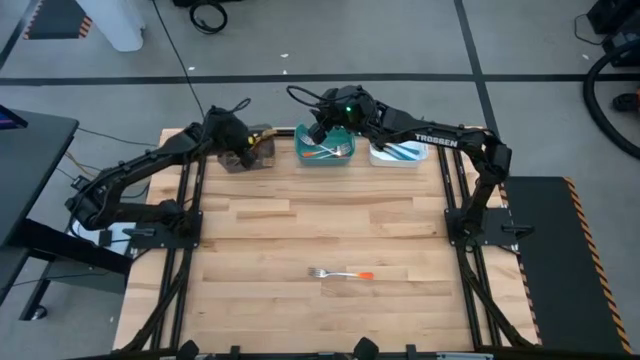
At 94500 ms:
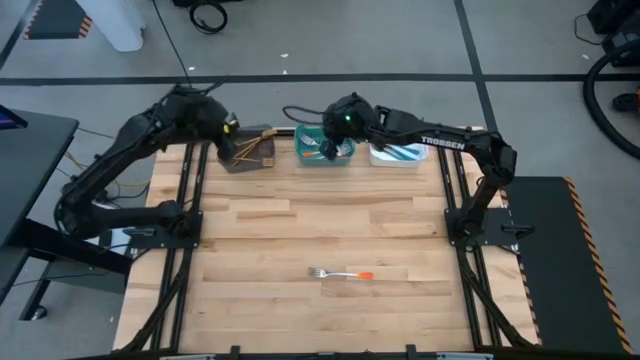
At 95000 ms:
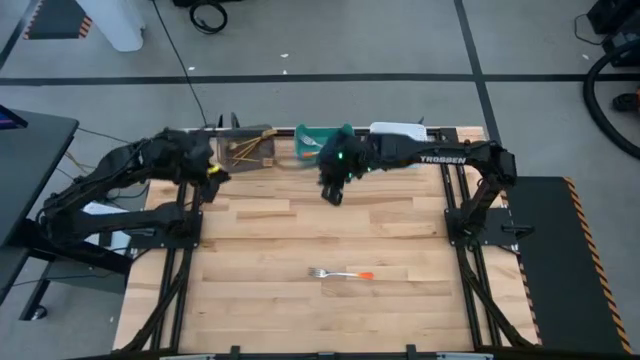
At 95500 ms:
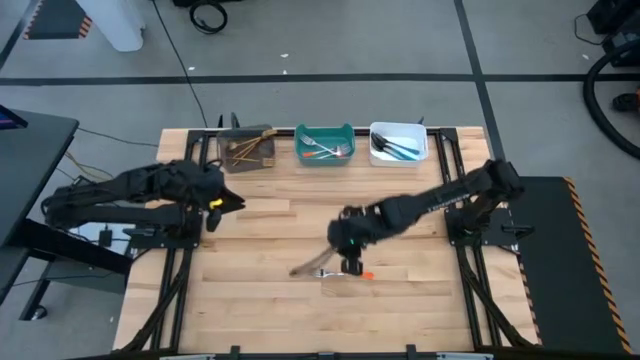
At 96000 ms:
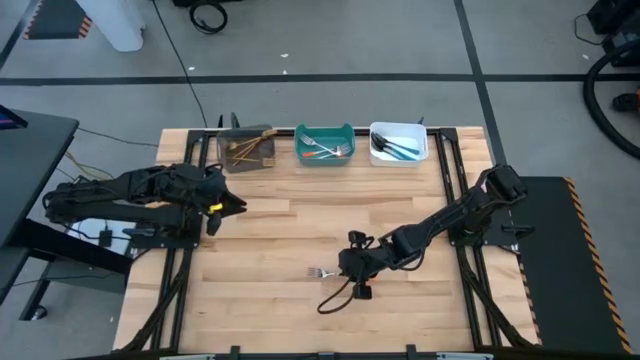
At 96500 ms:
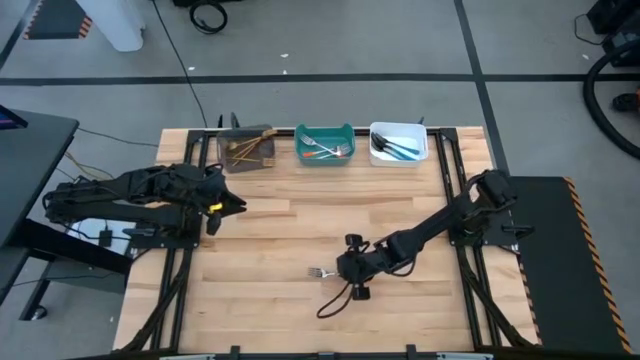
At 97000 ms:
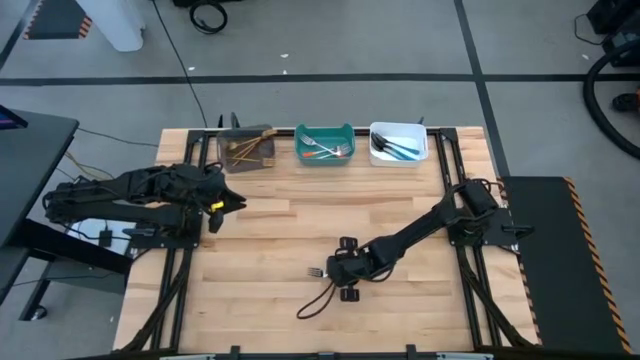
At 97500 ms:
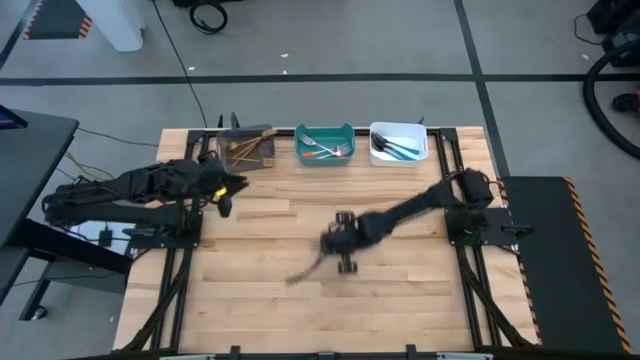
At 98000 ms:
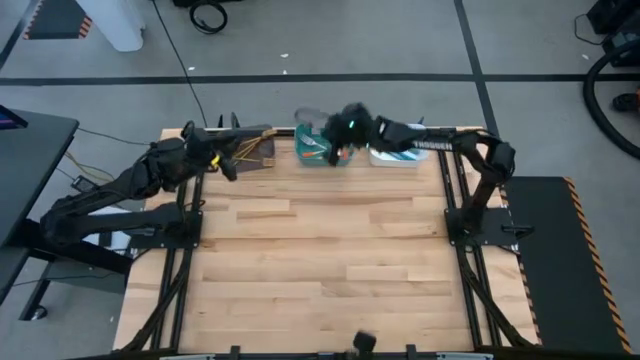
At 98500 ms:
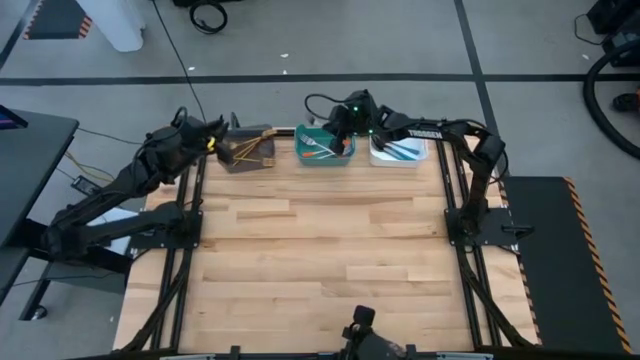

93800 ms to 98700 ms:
Task: Sort silverware by color (type)
Put the orange fork into the blue bin

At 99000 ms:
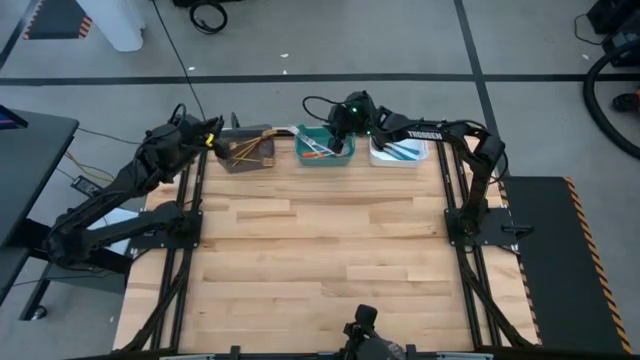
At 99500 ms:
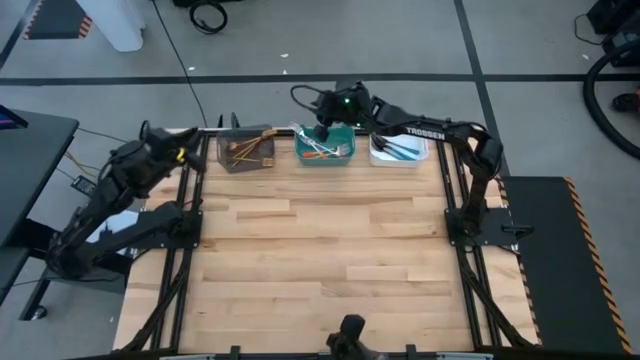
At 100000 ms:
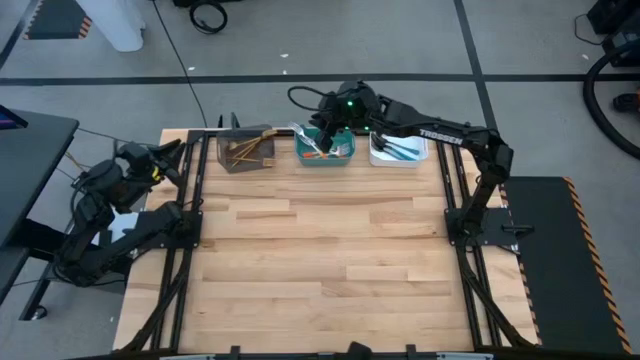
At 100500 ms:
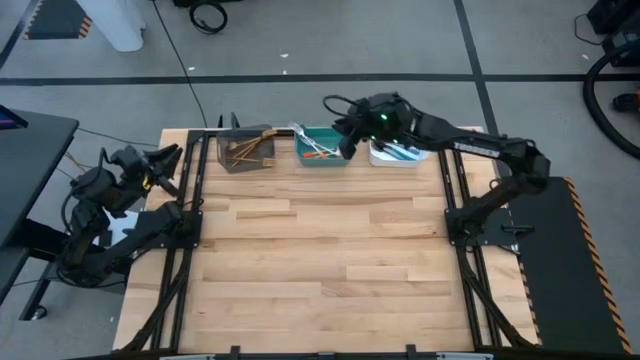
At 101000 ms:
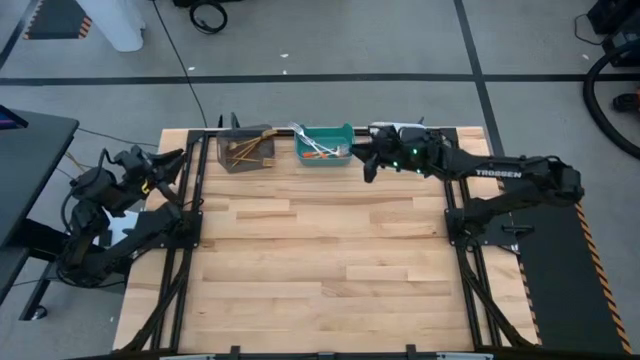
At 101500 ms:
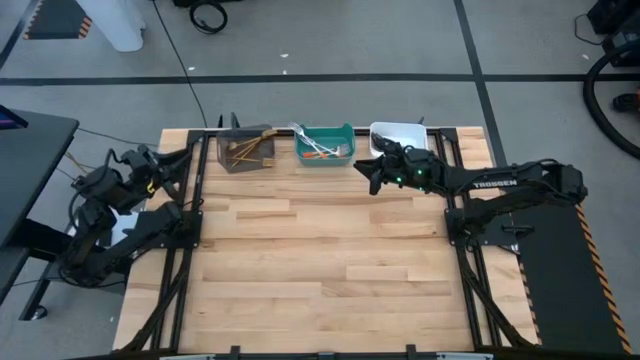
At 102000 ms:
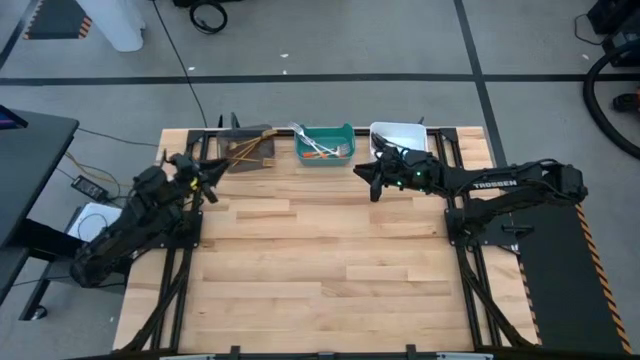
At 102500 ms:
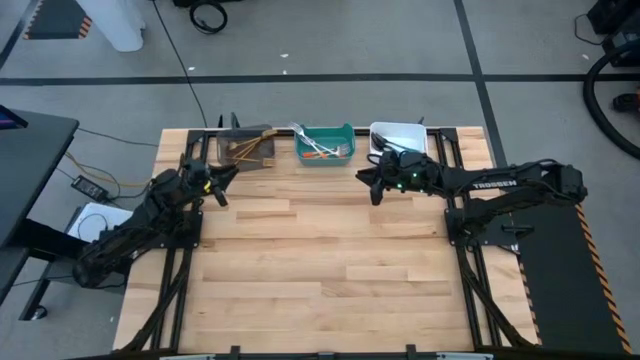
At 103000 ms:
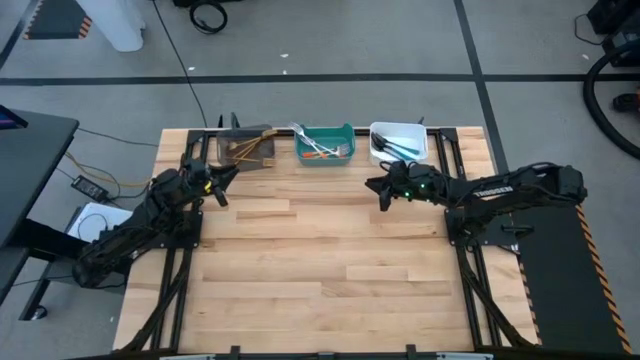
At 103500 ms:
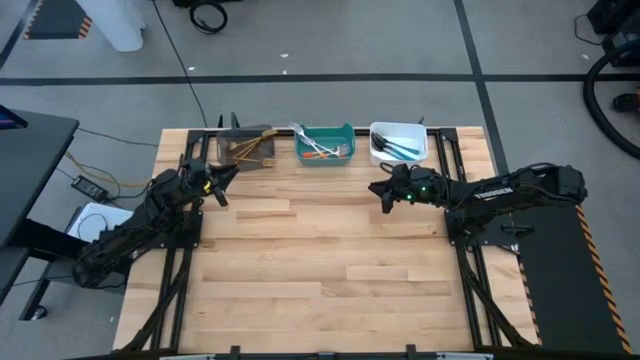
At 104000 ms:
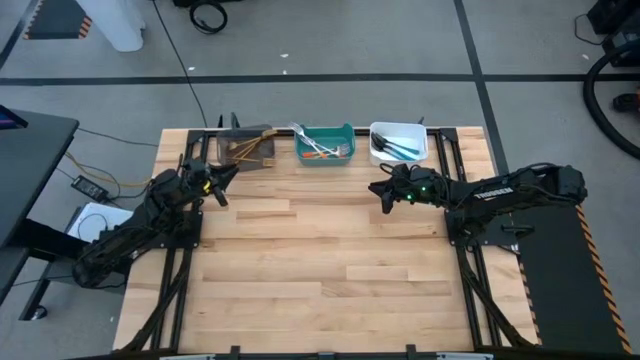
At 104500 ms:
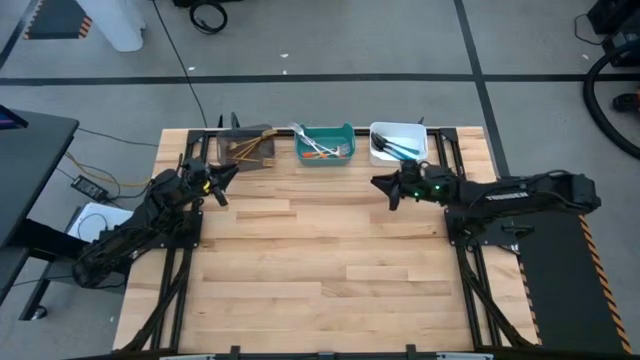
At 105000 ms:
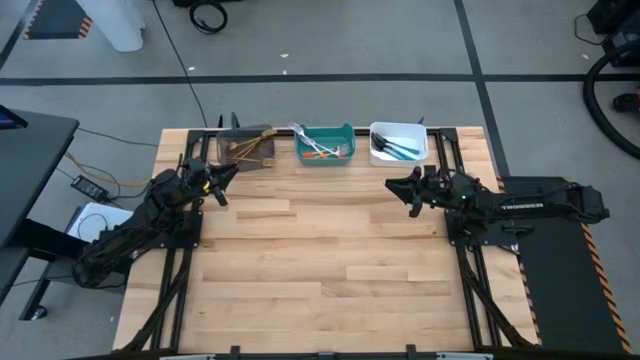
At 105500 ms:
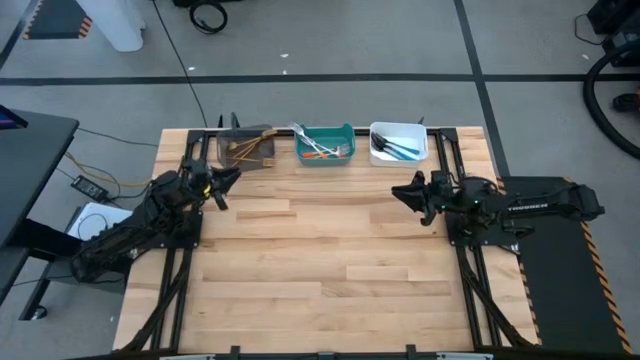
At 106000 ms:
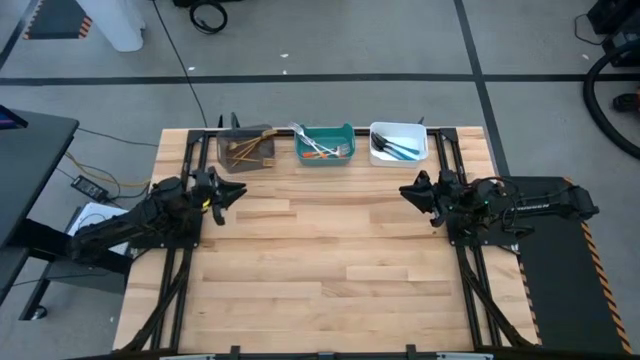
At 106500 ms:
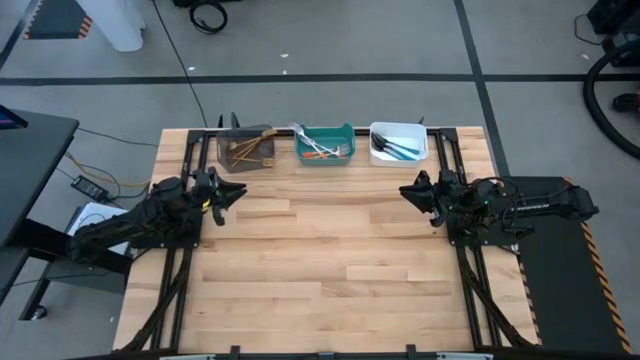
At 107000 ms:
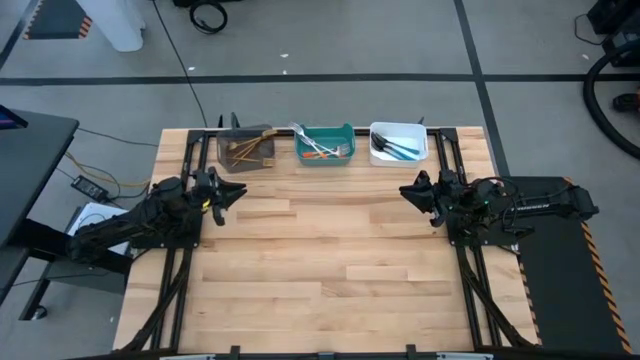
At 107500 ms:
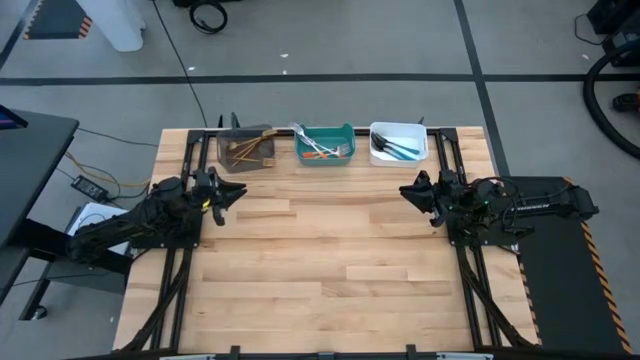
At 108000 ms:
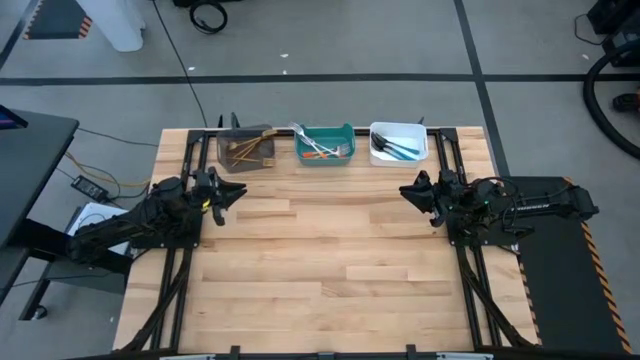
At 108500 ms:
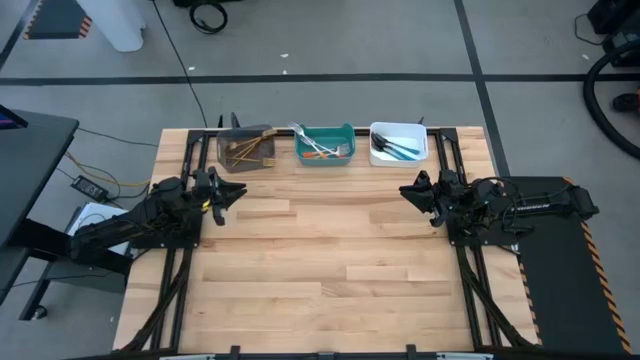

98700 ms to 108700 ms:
Return to Home Position

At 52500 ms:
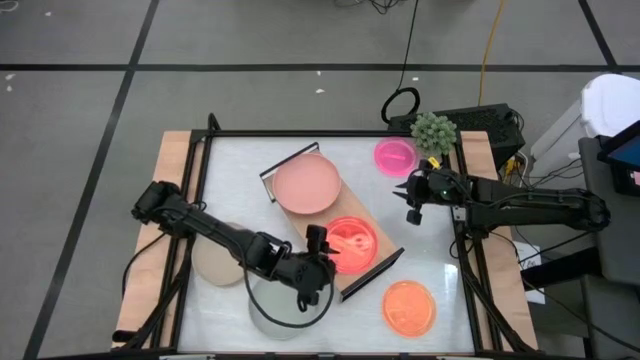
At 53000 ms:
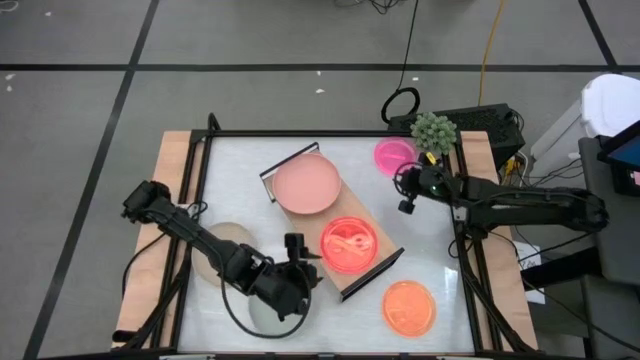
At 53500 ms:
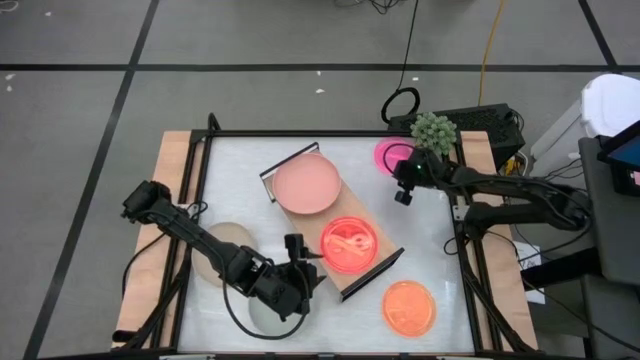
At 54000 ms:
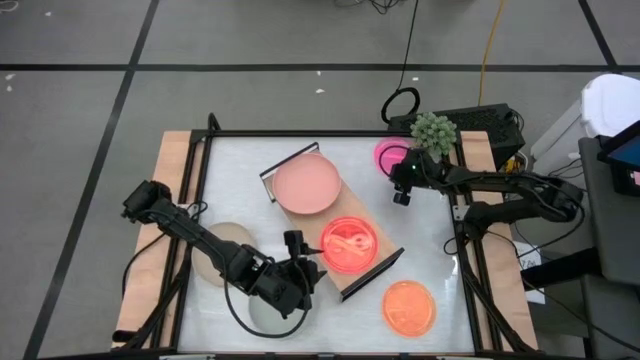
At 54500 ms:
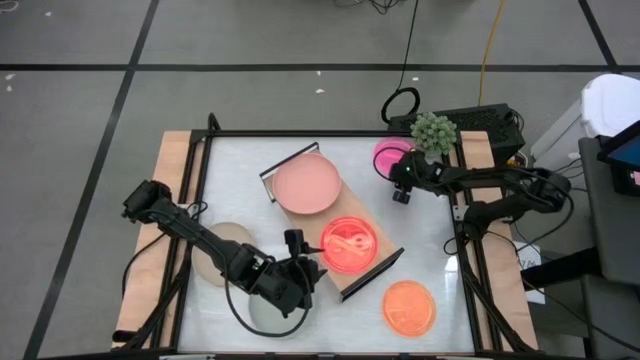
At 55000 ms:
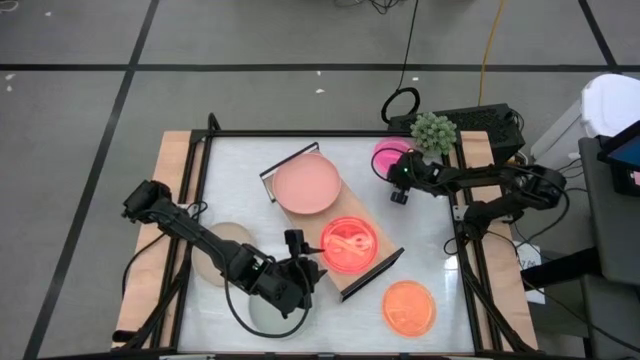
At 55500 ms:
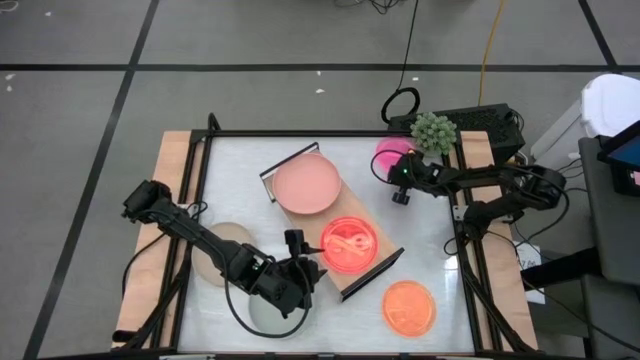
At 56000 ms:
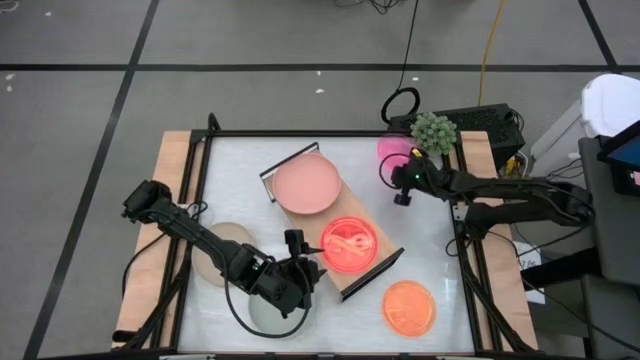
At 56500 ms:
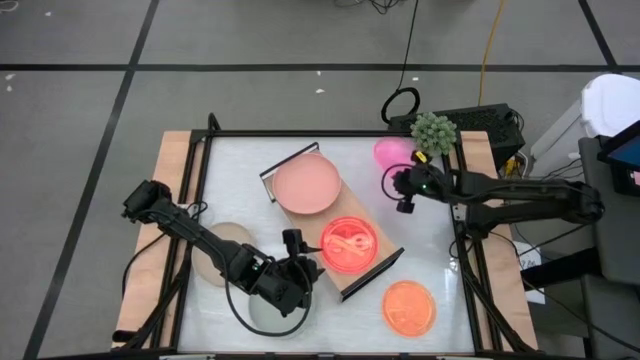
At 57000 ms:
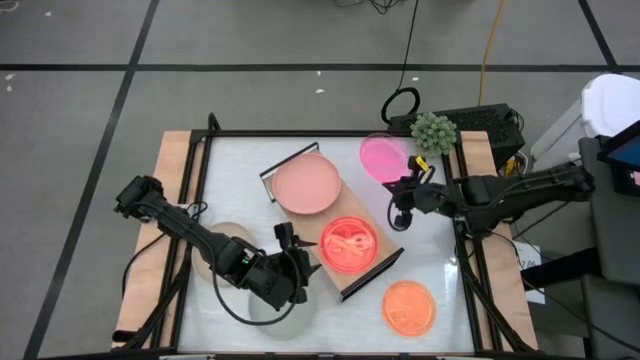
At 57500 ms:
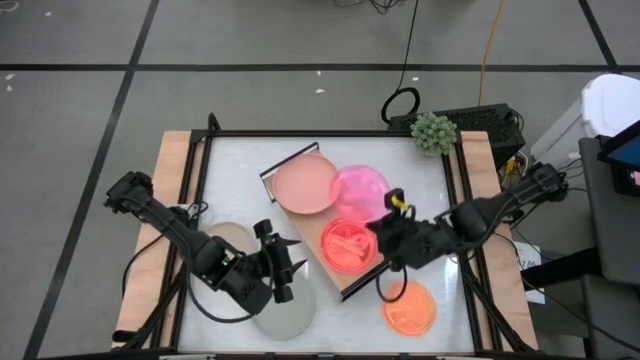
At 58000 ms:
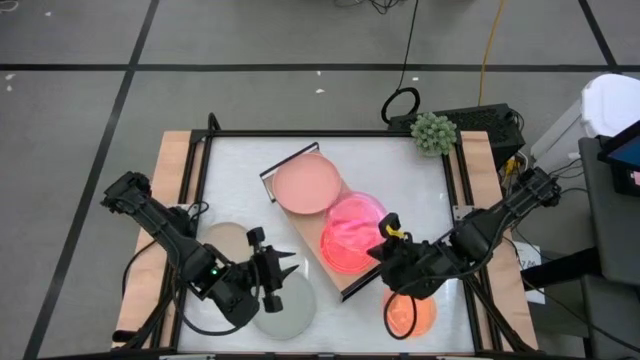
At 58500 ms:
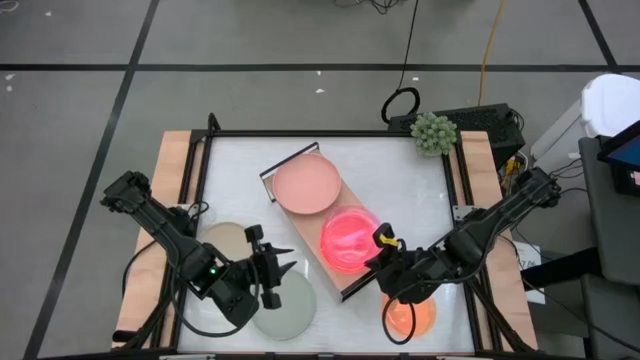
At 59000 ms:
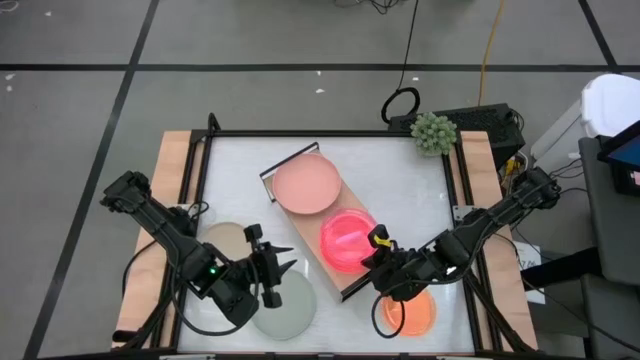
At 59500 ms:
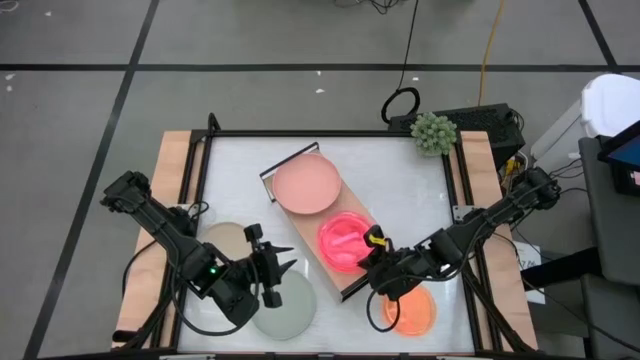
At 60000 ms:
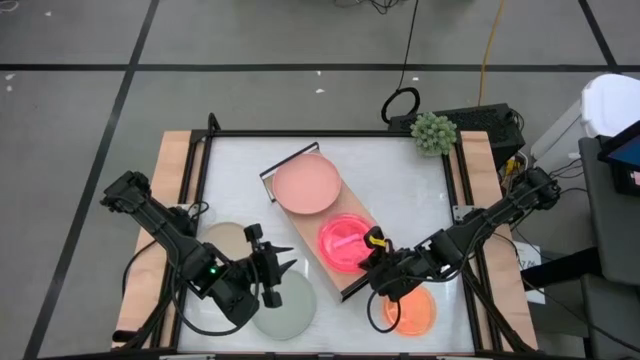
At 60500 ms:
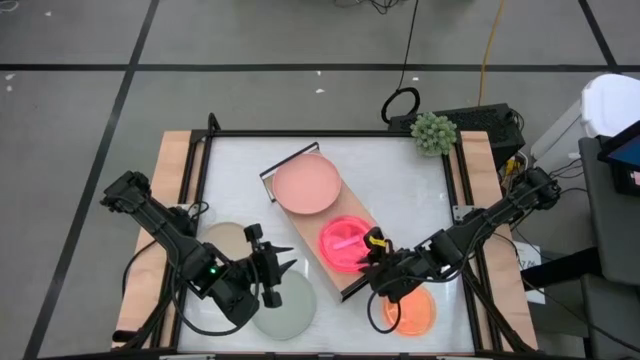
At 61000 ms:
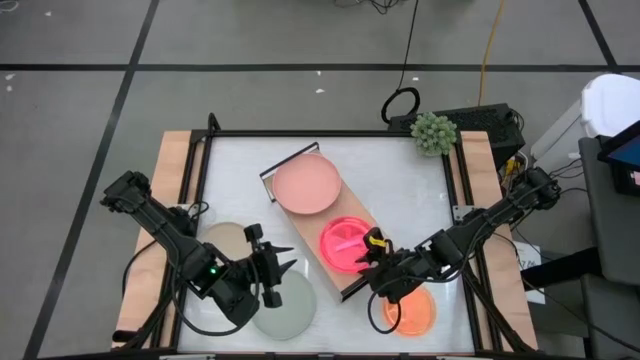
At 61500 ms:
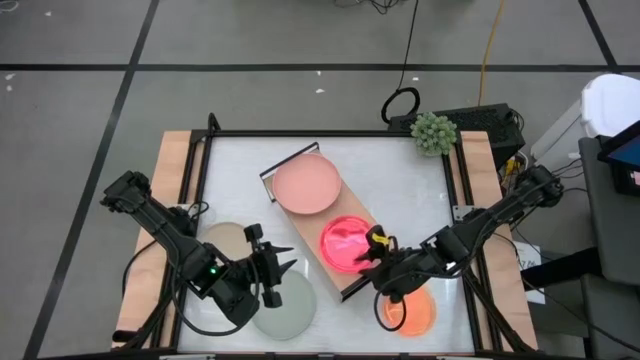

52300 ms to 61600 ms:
Task: Place and stack plates onto a shelf
Stack the small pink plate on top of the small orange plate on the shelf
